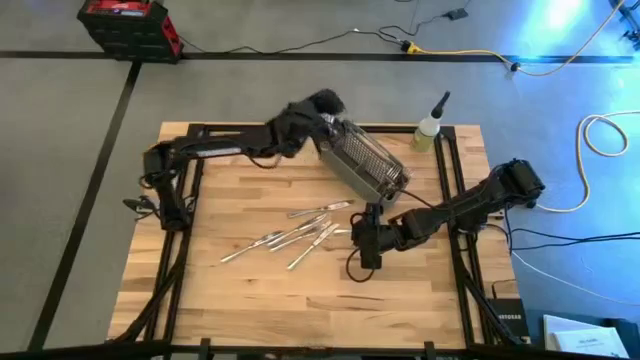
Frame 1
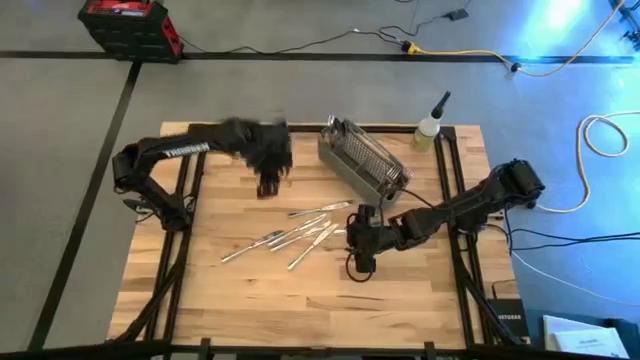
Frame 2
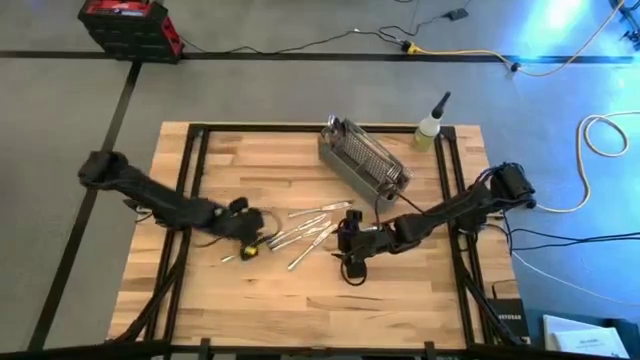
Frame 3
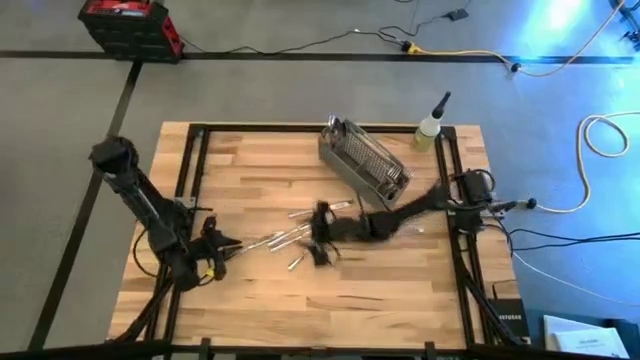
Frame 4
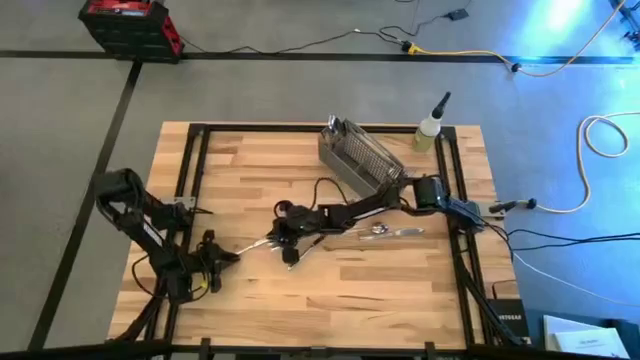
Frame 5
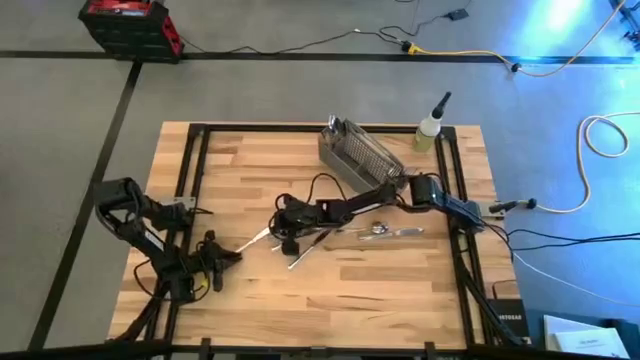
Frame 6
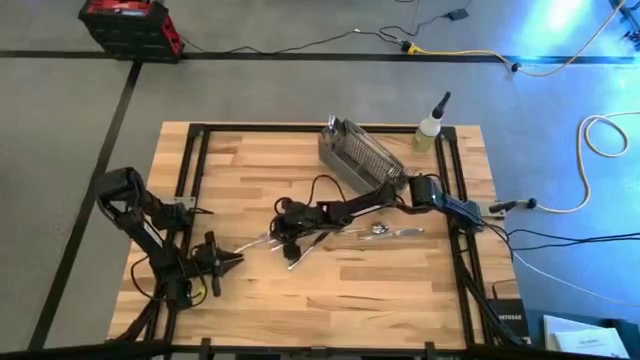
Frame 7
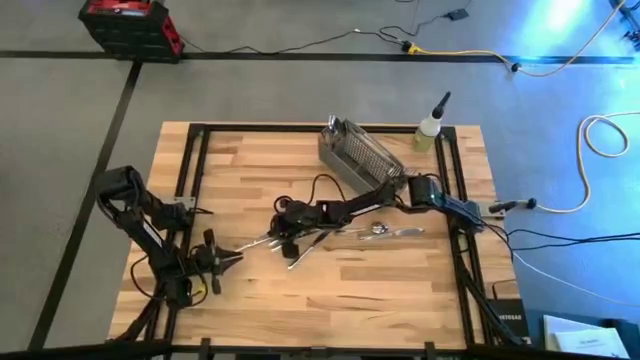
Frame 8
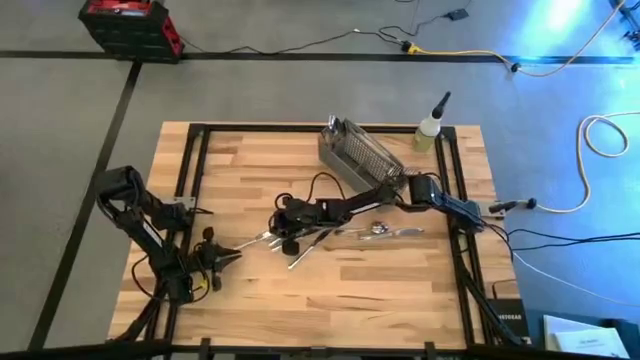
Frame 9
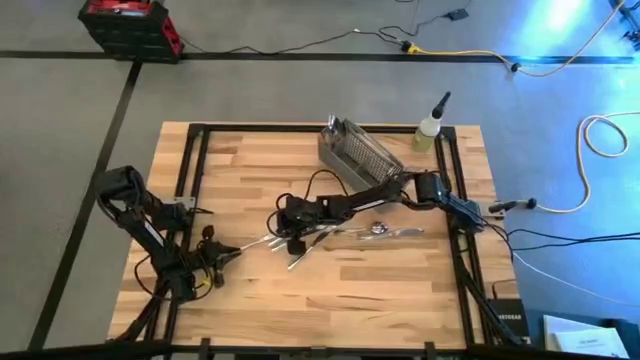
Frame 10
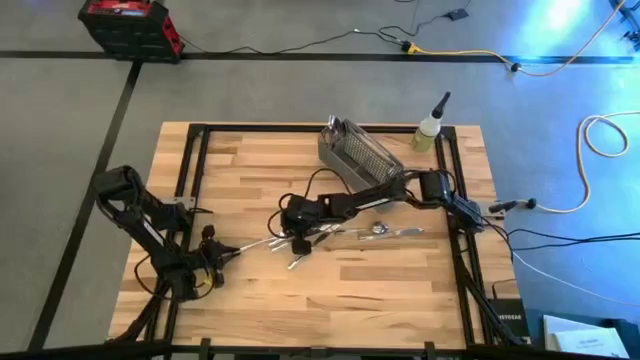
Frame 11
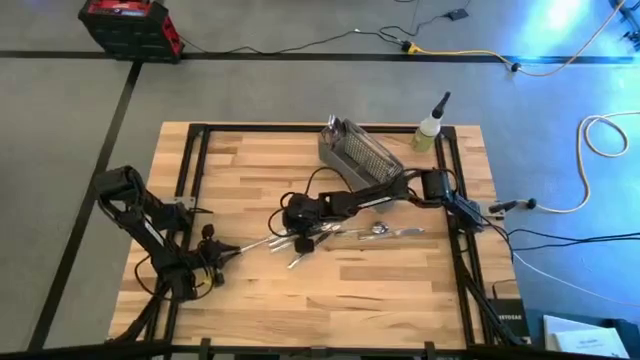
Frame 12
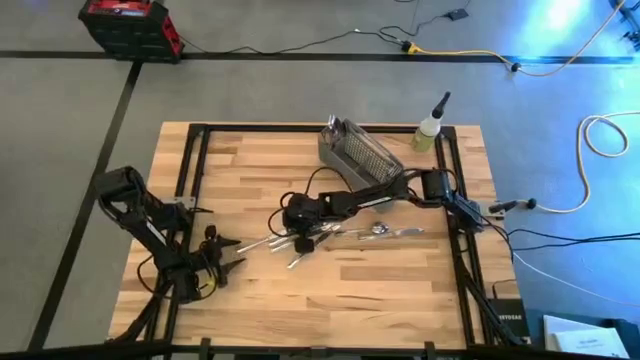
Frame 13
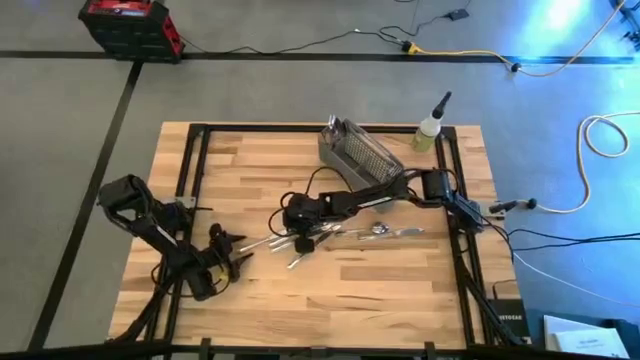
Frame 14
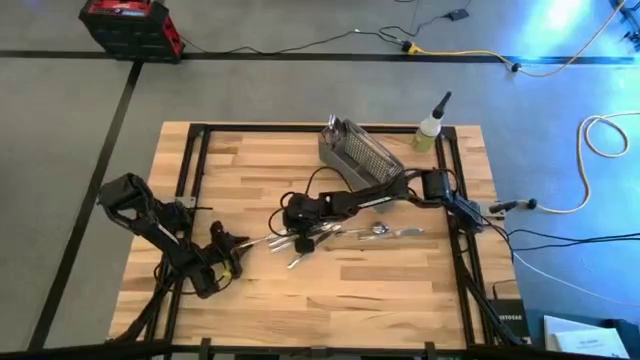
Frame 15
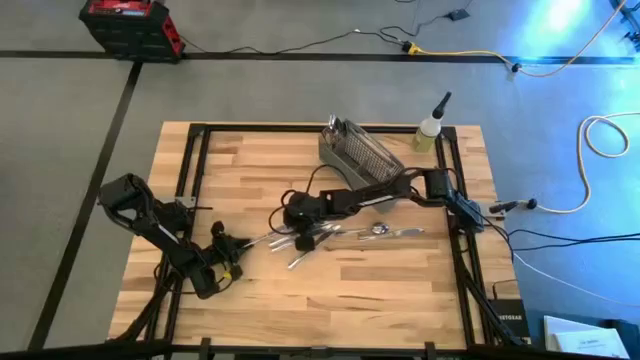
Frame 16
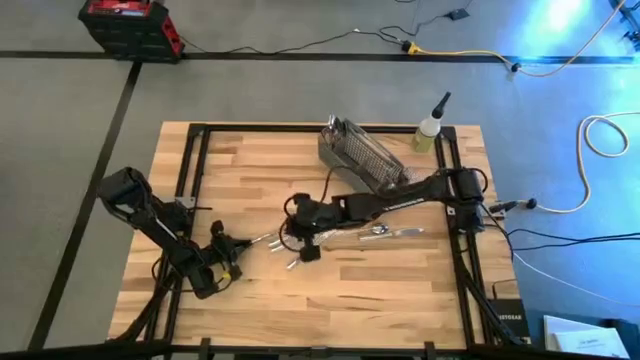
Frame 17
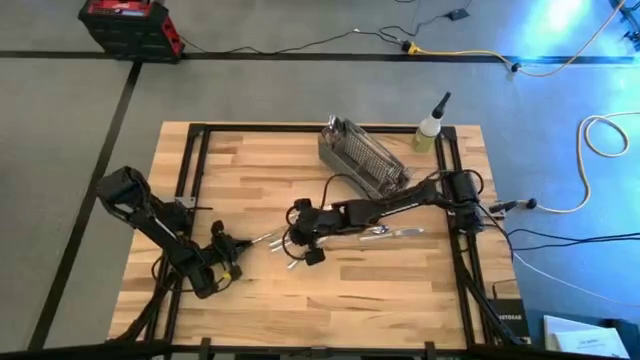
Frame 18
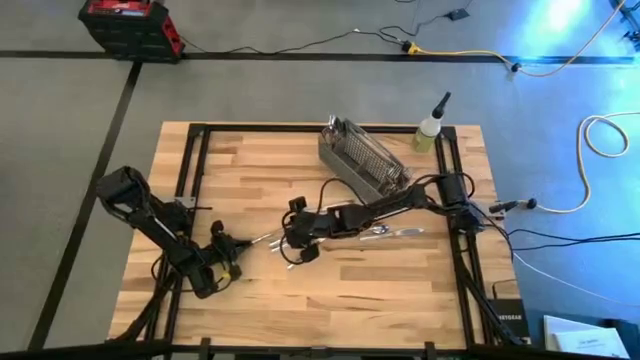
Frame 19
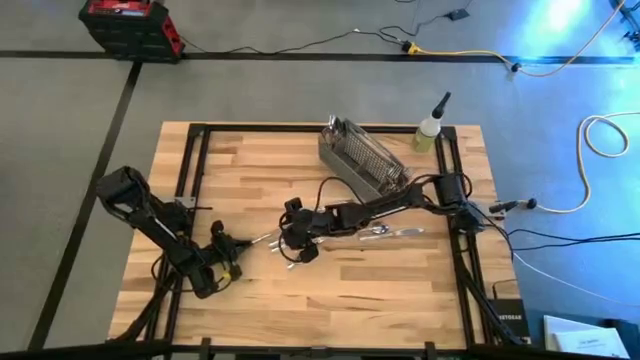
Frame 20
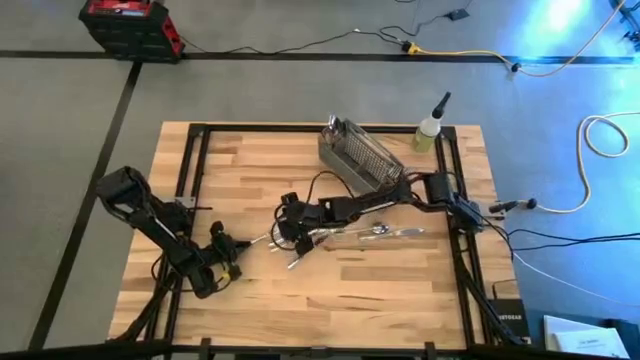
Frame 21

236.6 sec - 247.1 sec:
Task: Sort silverware
Put the silver knife into the gray silverware organizer

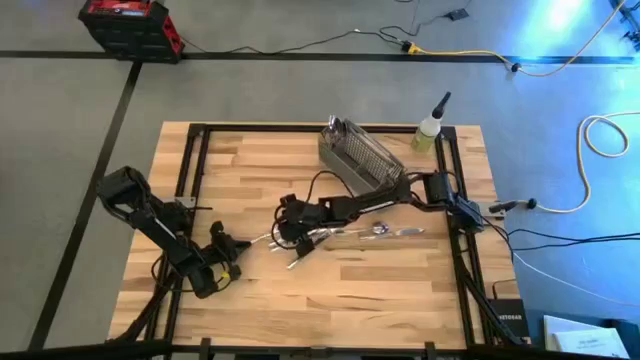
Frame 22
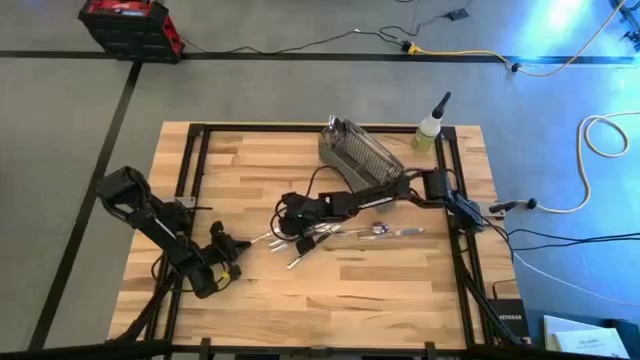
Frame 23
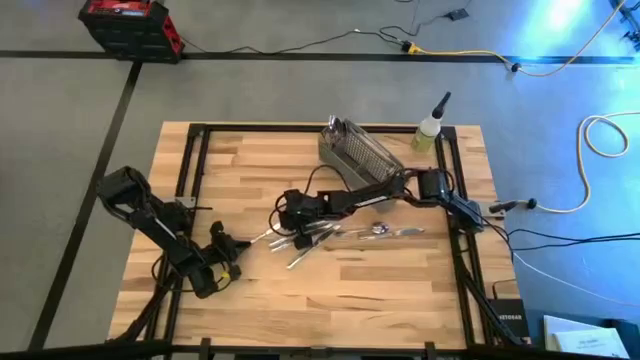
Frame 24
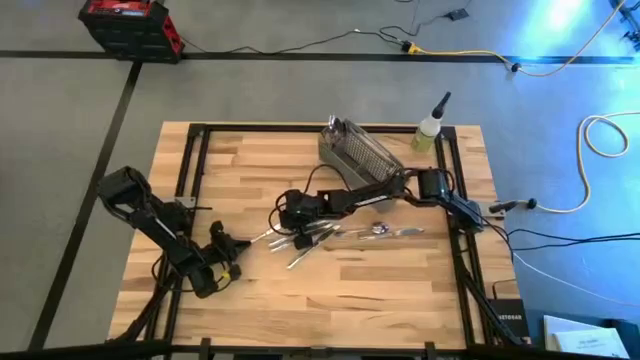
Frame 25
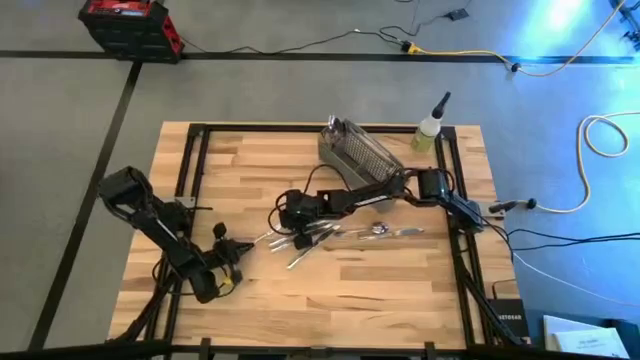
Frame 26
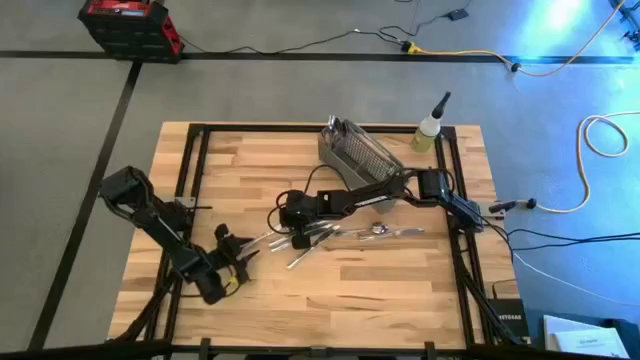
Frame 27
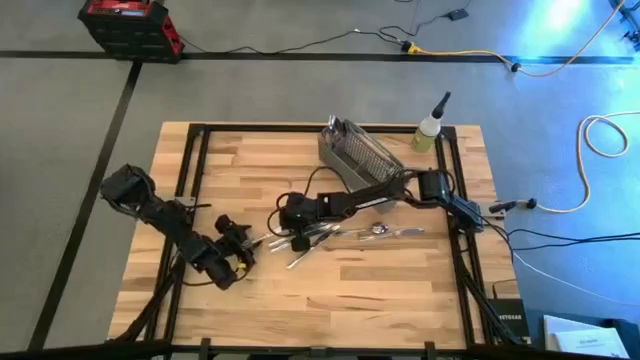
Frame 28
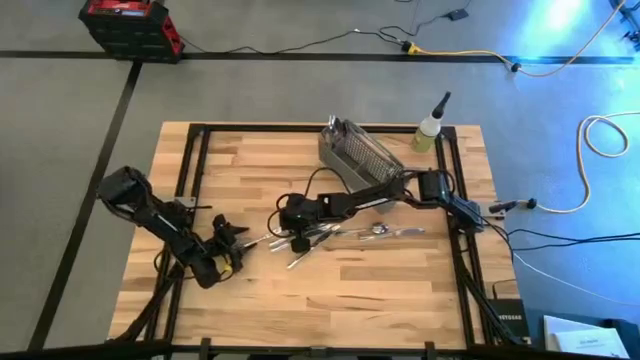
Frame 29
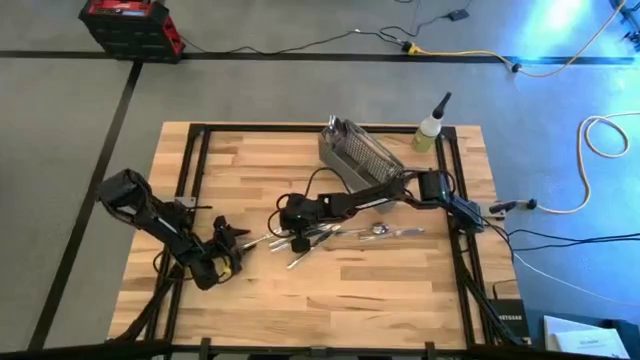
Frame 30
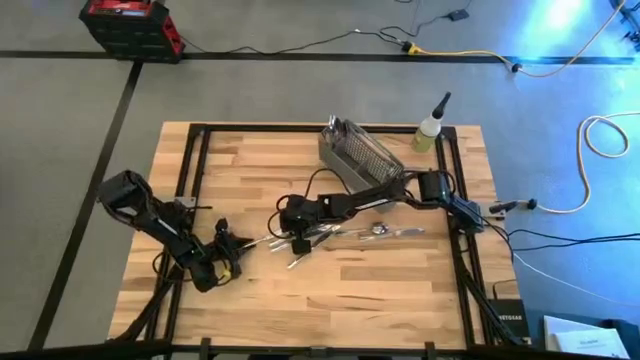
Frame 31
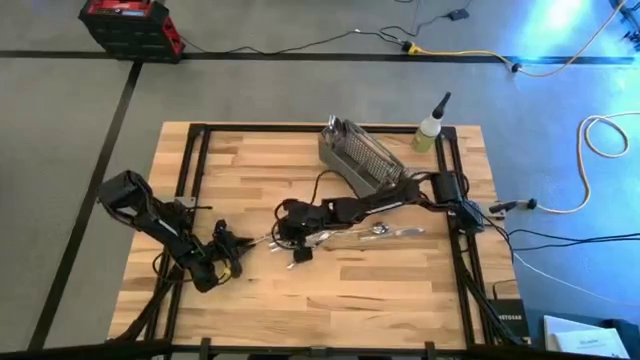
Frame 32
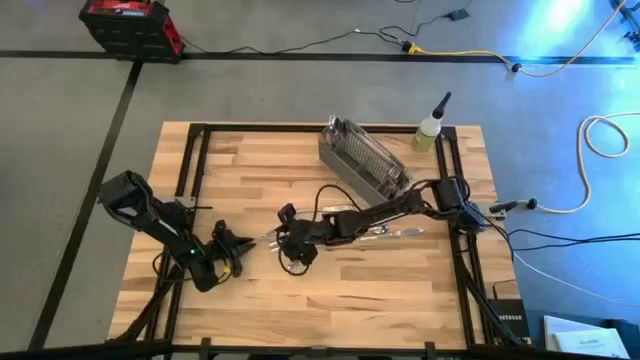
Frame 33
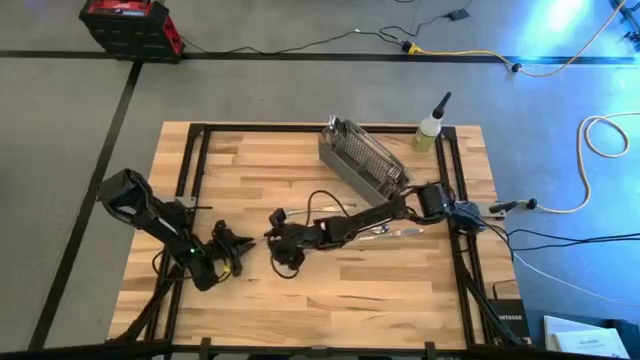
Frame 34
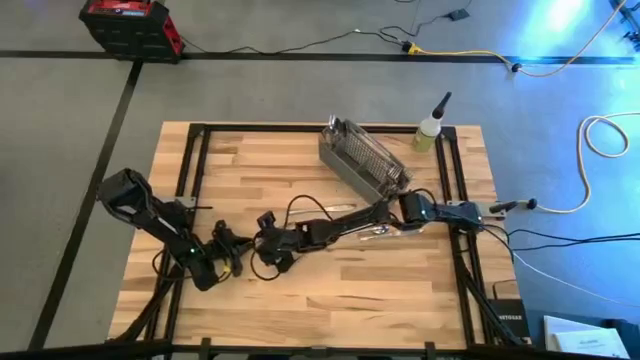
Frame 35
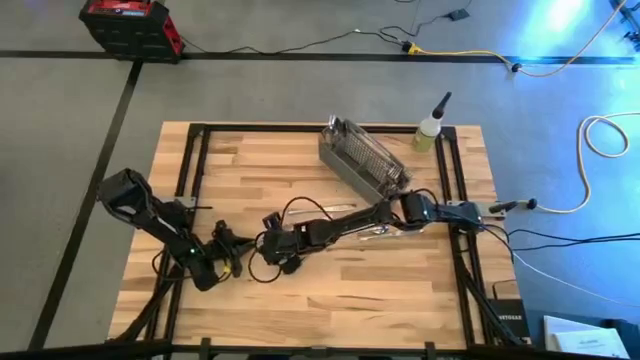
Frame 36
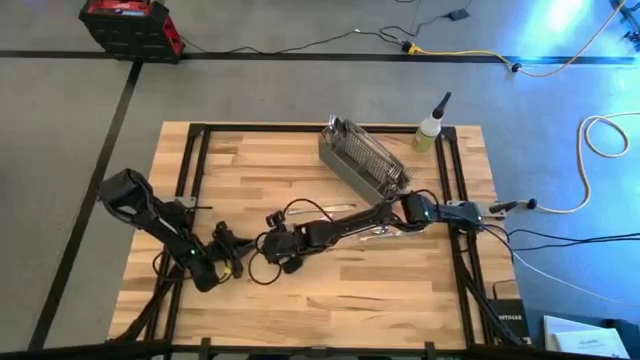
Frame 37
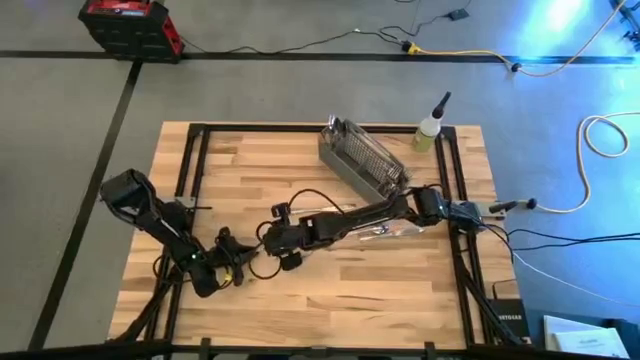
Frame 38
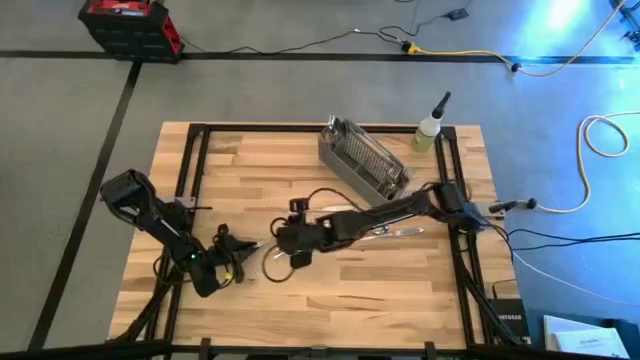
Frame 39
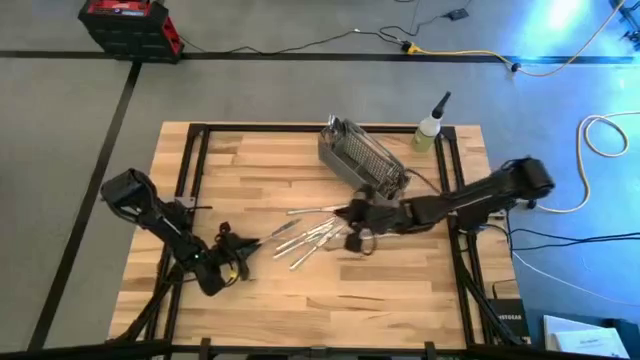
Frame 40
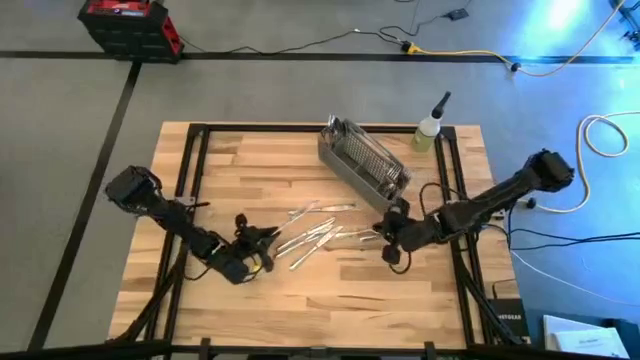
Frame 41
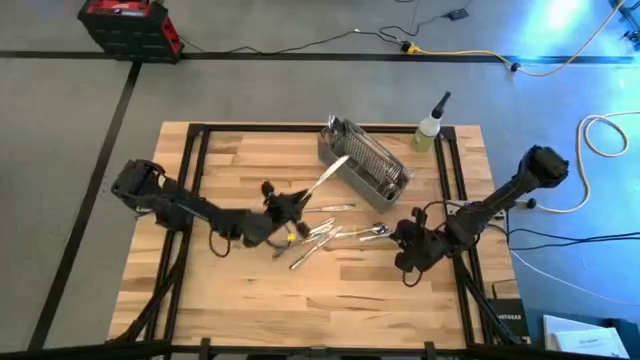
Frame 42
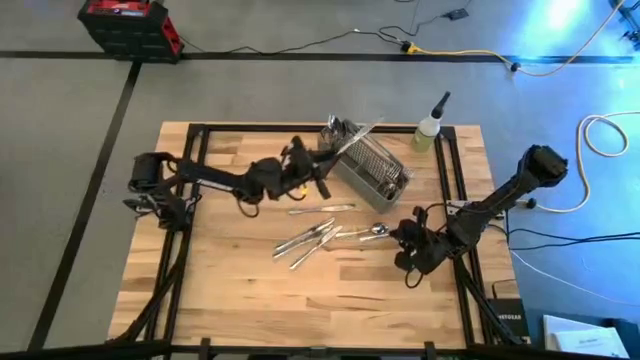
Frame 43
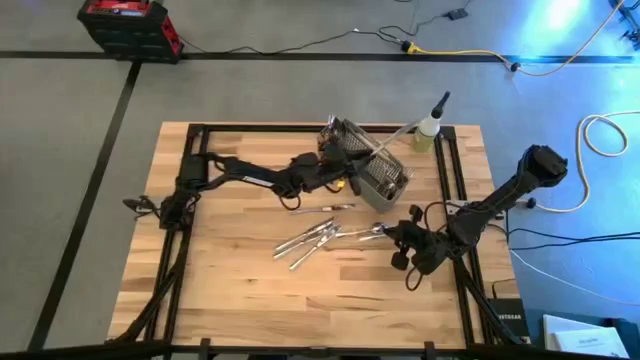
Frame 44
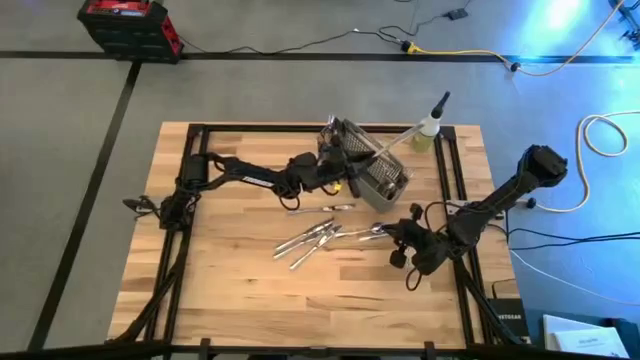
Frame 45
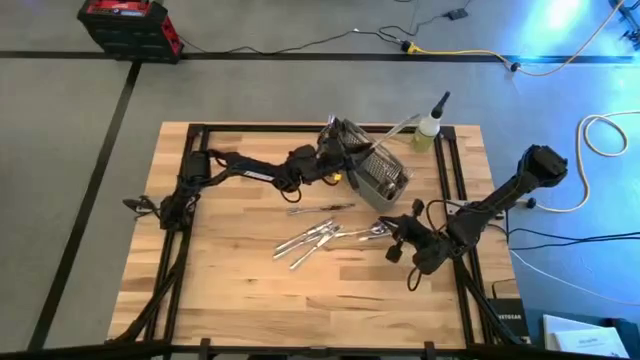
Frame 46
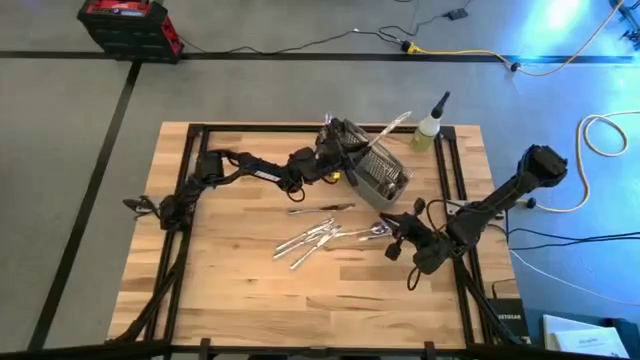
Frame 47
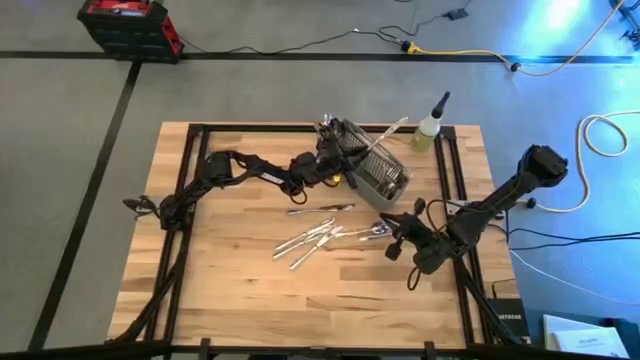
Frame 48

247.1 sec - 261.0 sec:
Put the silver knife into the gray silverware organizer
